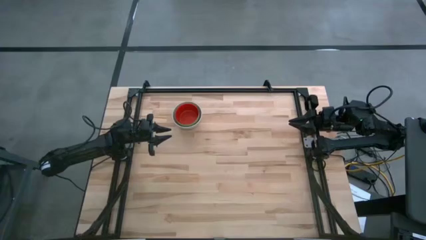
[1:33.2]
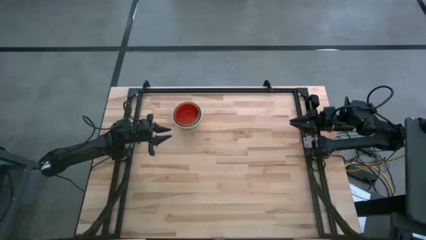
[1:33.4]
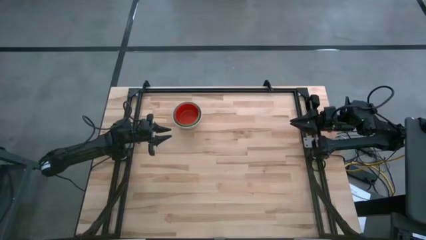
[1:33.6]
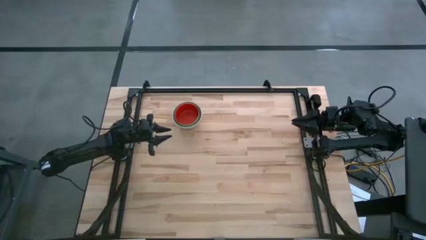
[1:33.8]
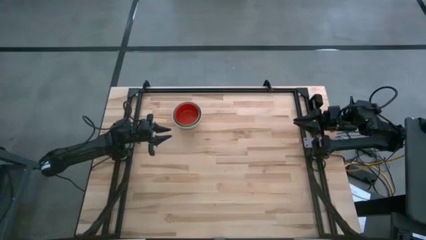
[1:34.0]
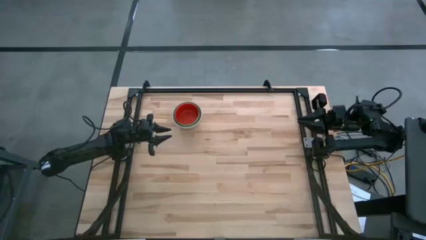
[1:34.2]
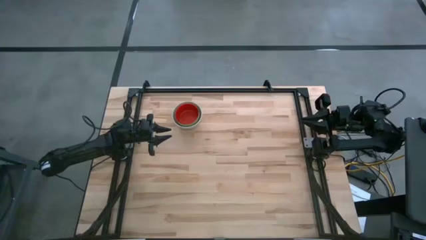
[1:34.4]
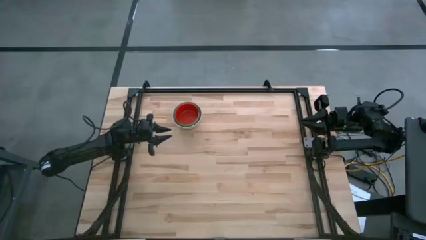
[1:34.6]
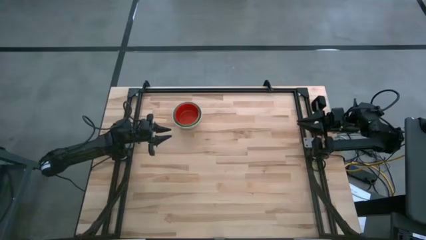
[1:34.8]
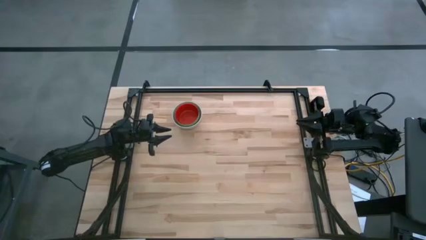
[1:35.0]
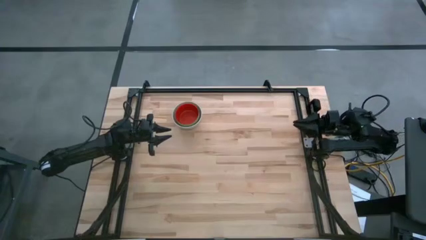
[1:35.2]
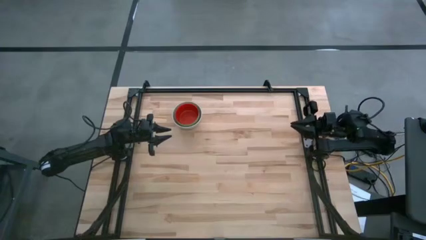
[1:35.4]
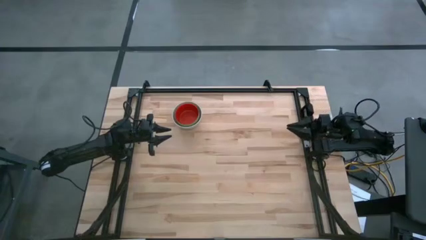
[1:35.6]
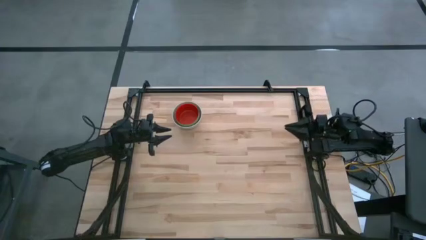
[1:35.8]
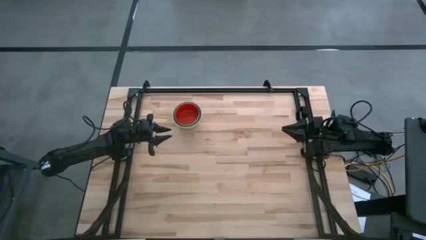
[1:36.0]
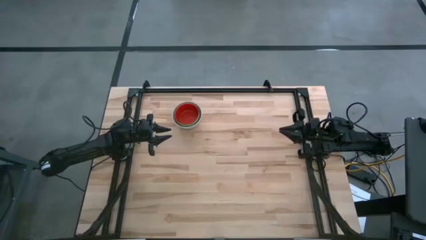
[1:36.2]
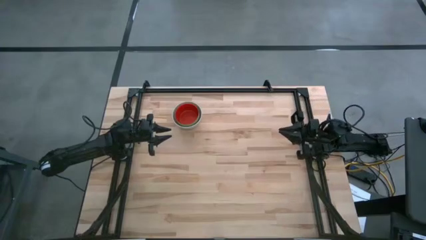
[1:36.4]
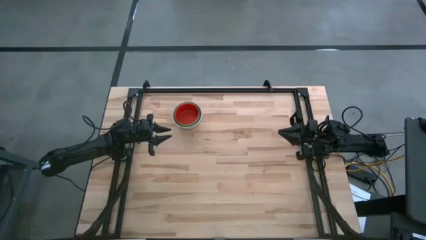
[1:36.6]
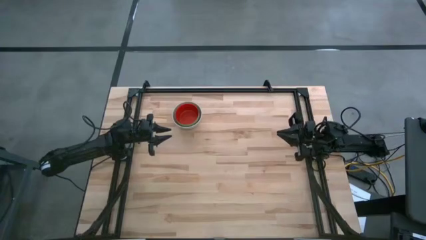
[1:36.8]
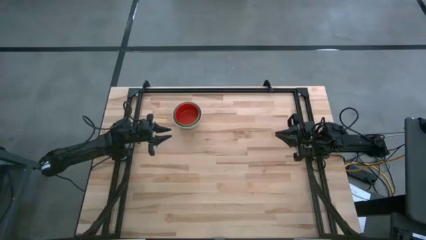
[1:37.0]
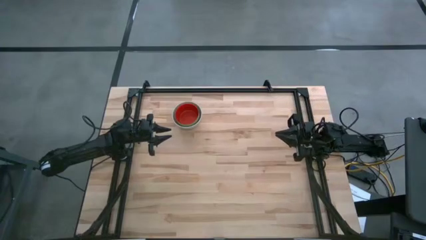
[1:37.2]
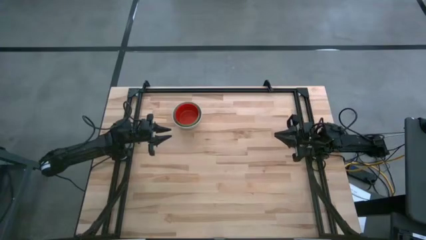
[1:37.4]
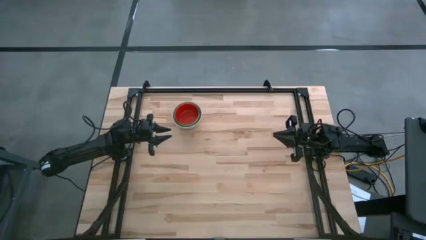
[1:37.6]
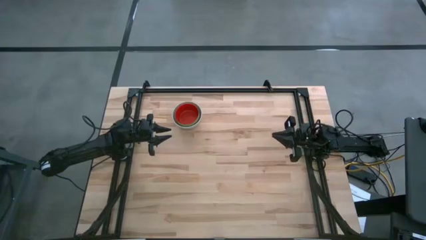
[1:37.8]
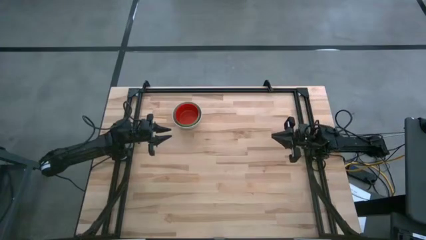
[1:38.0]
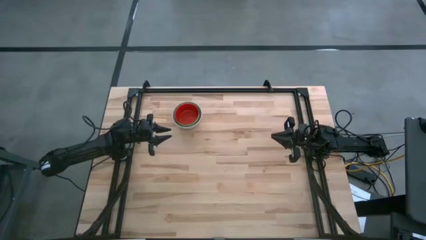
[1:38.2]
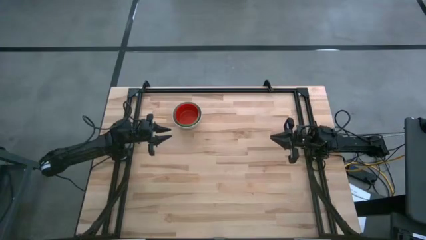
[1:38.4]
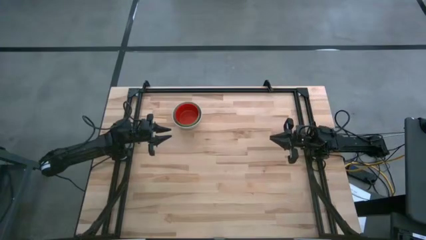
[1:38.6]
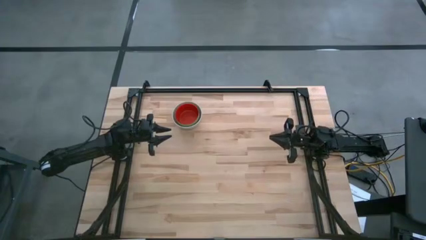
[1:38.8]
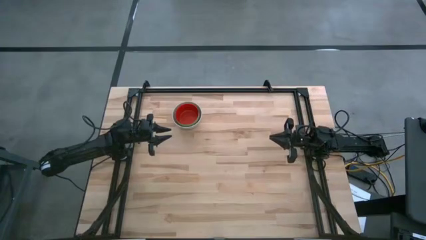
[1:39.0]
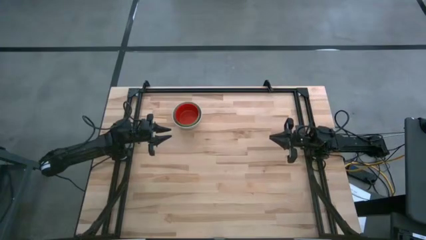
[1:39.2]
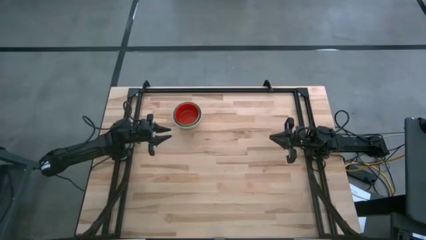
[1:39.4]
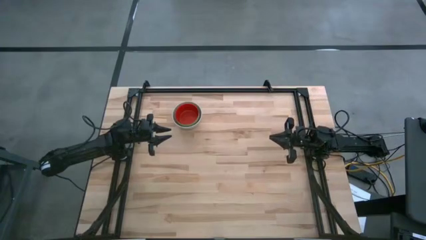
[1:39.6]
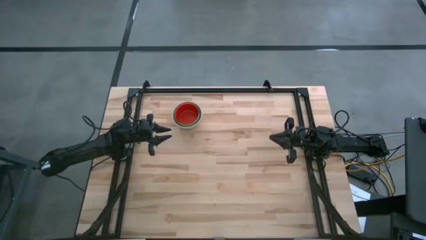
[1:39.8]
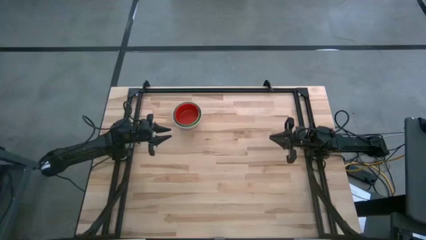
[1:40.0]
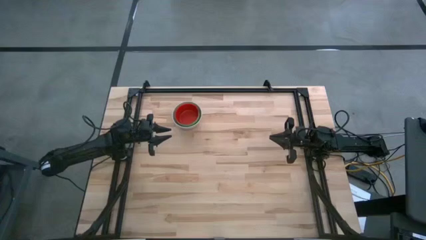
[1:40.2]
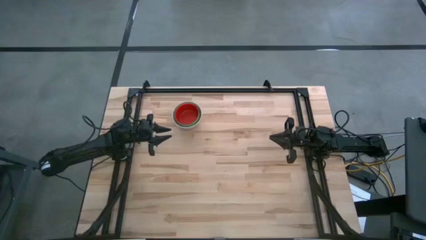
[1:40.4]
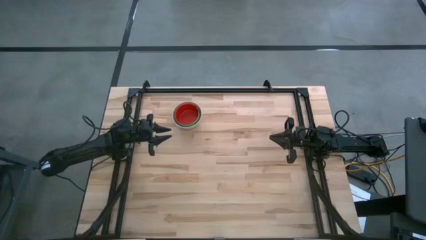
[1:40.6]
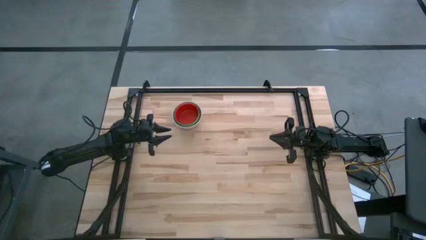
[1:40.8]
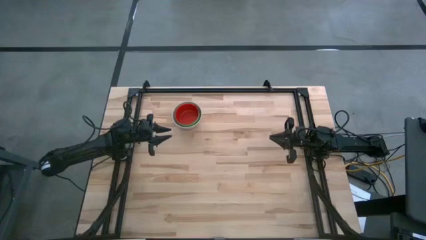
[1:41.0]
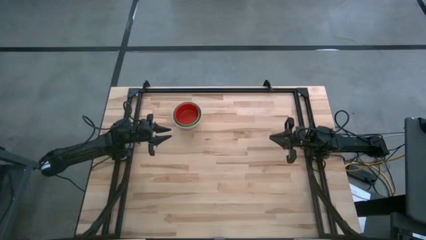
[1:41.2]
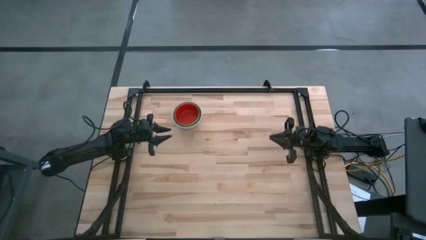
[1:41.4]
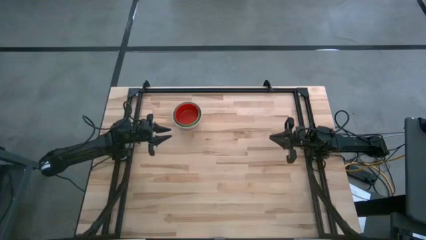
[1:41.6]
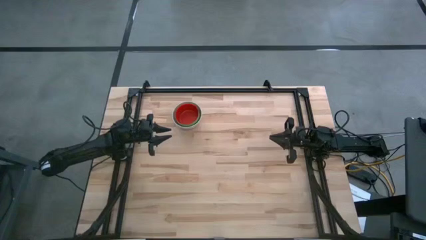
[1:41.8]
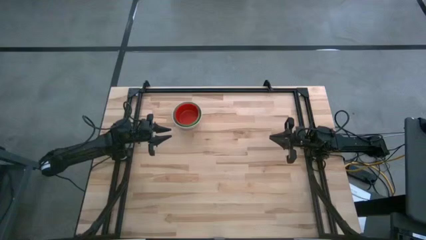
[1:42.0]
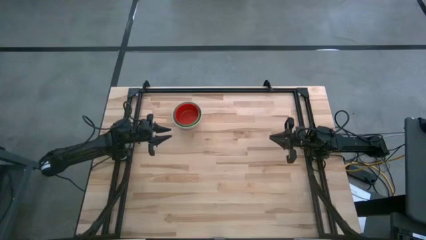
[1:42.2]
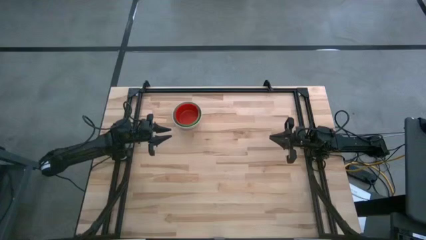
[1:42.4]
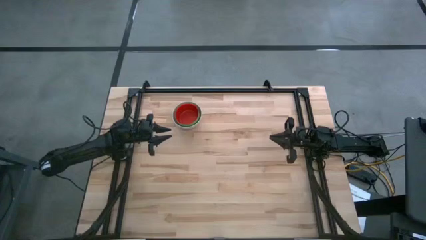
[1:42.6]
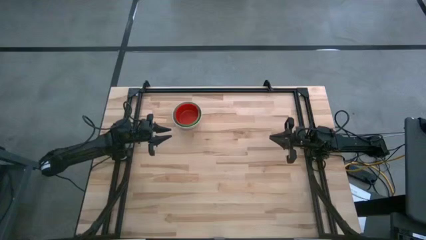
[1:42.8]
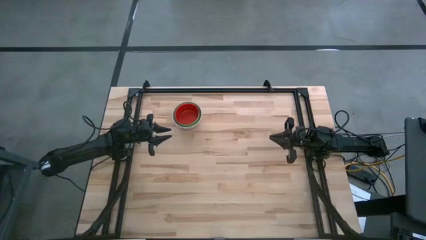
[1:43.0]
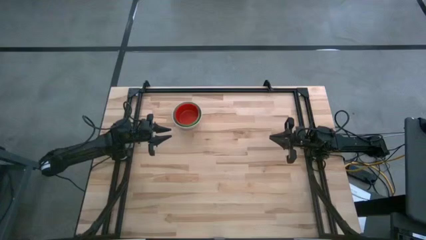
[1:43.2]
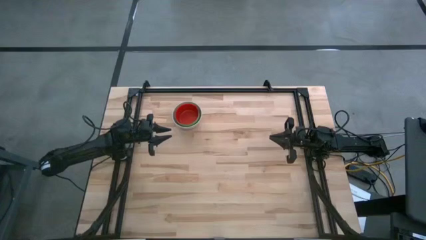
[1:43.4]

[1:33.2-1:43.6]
Return to Home Position
